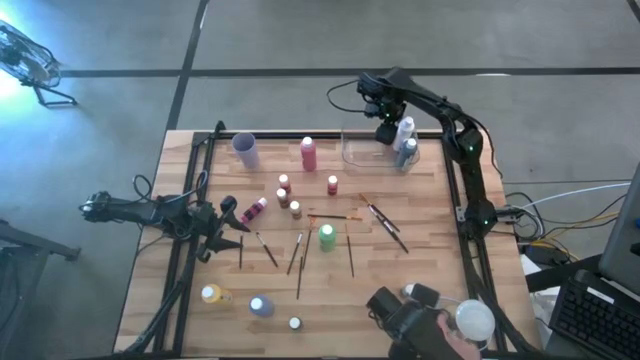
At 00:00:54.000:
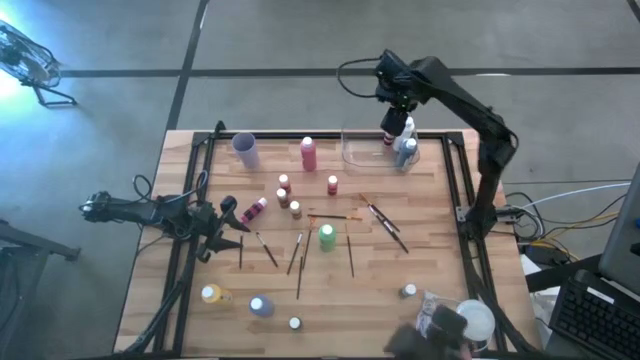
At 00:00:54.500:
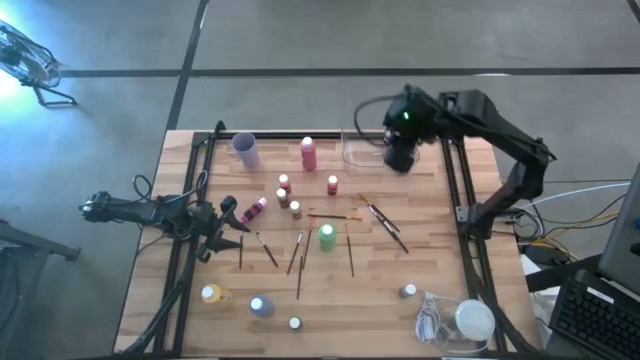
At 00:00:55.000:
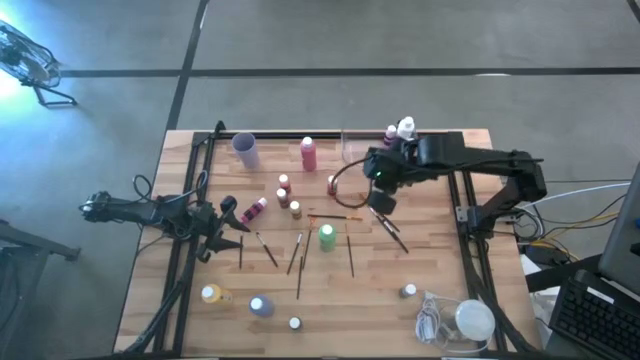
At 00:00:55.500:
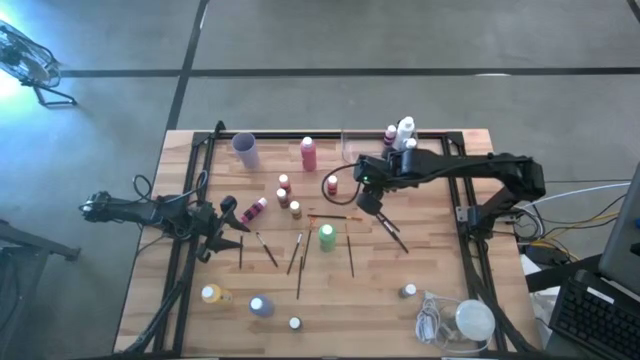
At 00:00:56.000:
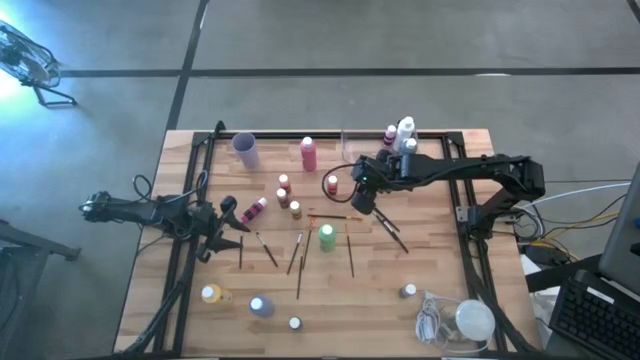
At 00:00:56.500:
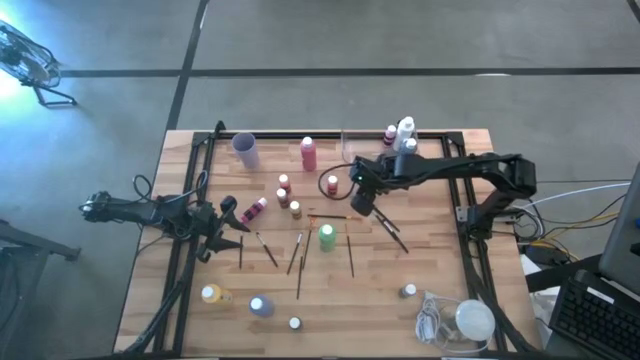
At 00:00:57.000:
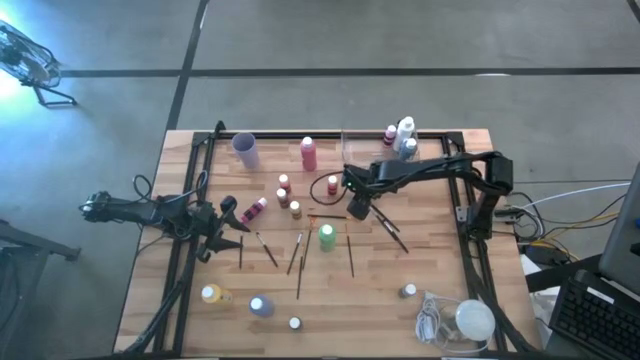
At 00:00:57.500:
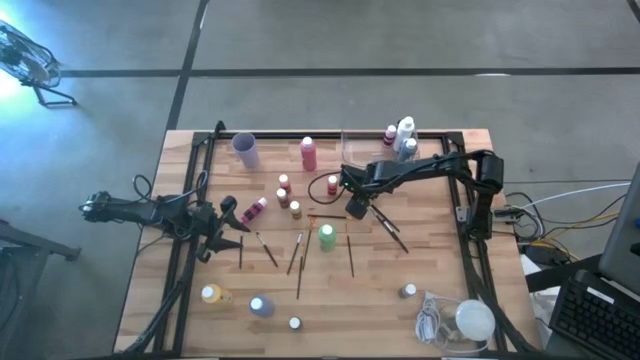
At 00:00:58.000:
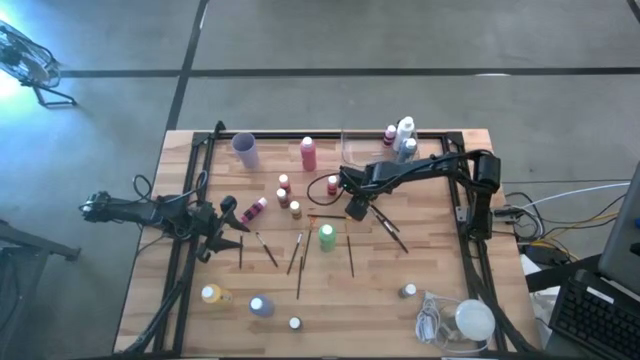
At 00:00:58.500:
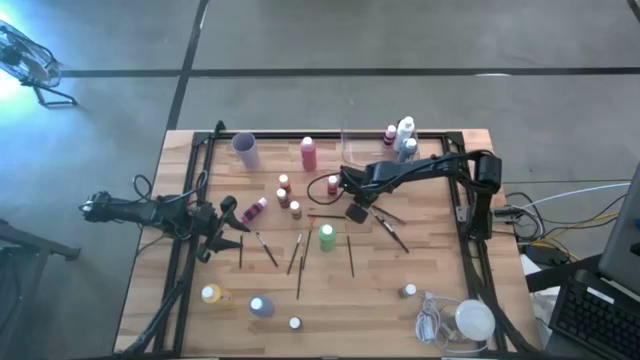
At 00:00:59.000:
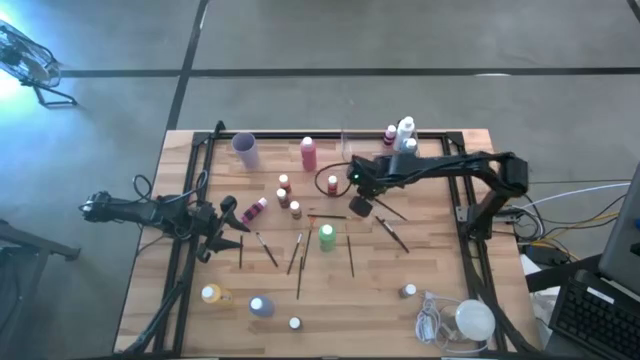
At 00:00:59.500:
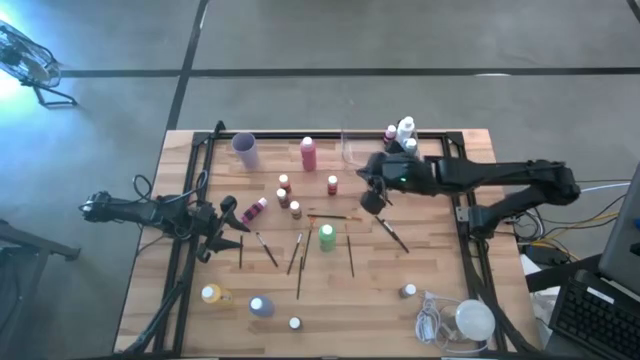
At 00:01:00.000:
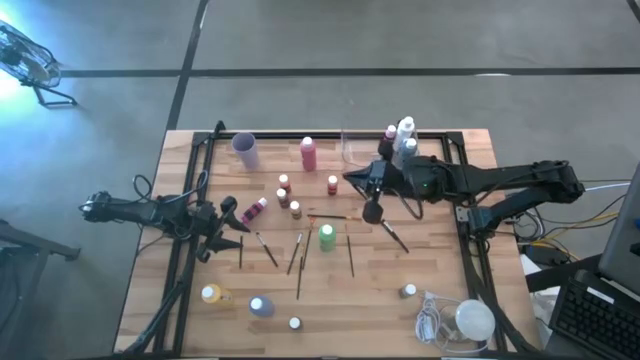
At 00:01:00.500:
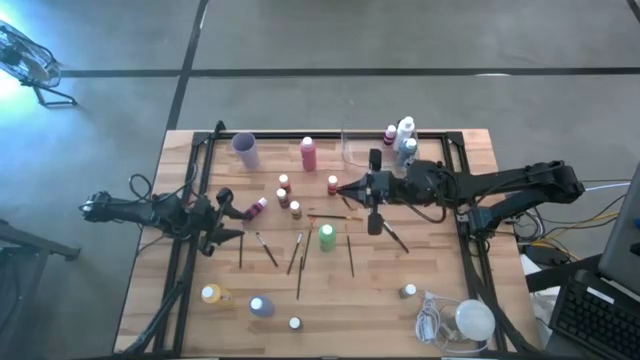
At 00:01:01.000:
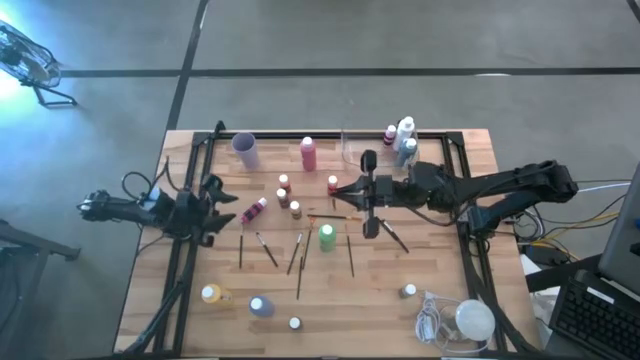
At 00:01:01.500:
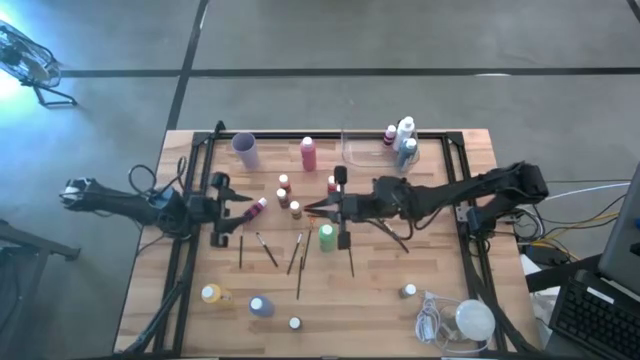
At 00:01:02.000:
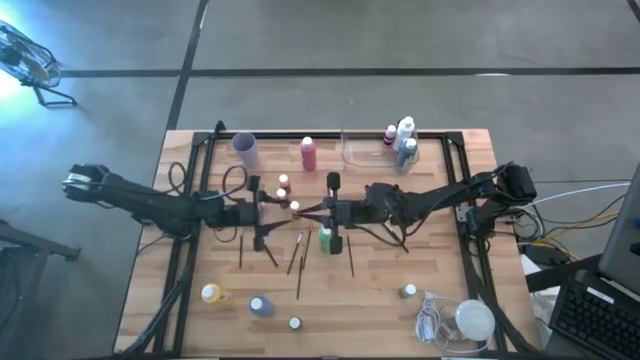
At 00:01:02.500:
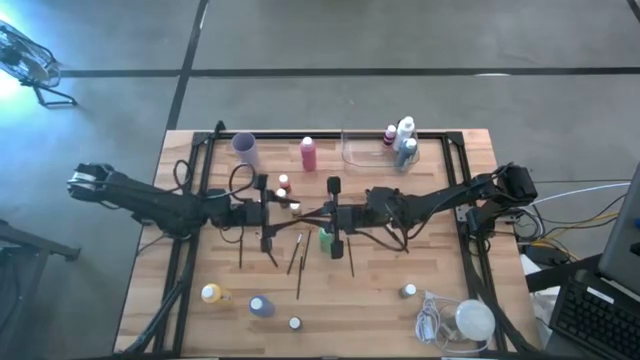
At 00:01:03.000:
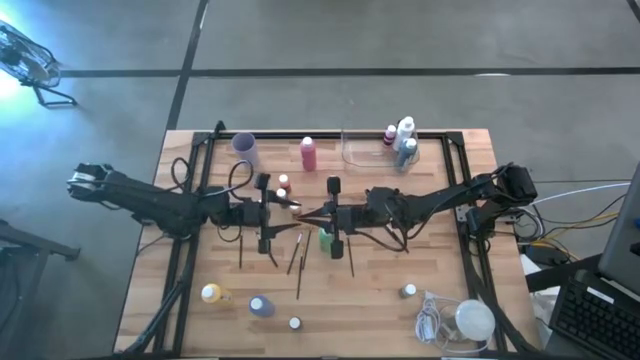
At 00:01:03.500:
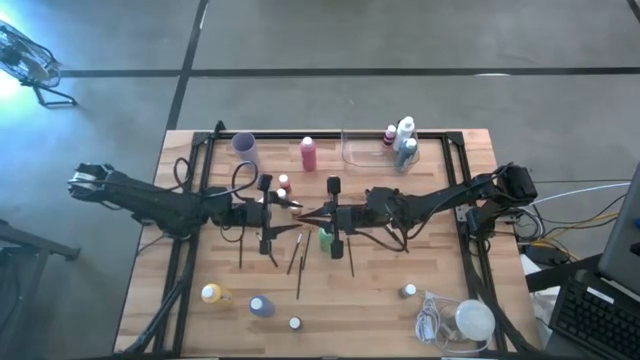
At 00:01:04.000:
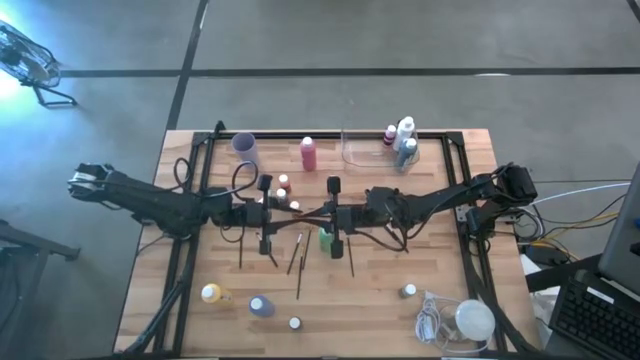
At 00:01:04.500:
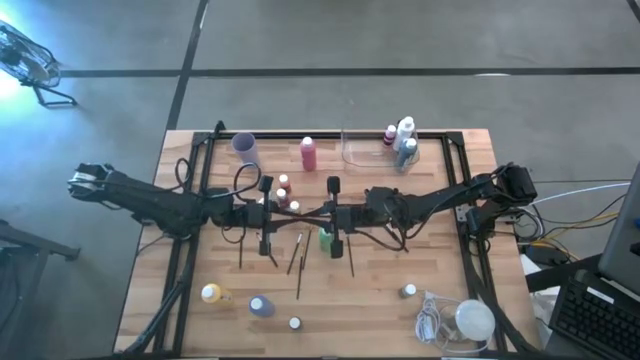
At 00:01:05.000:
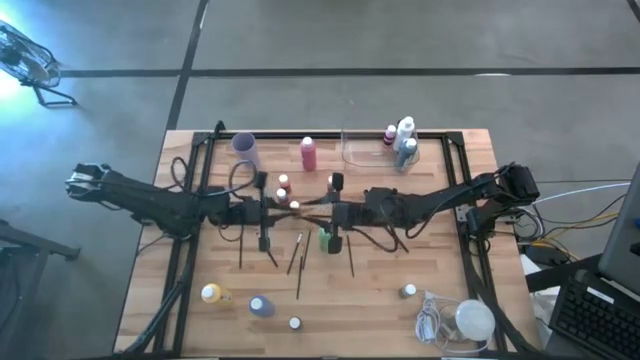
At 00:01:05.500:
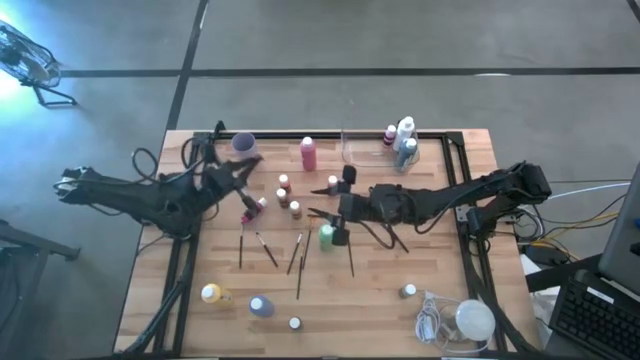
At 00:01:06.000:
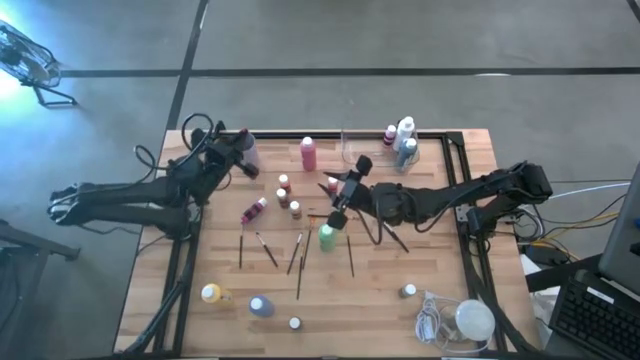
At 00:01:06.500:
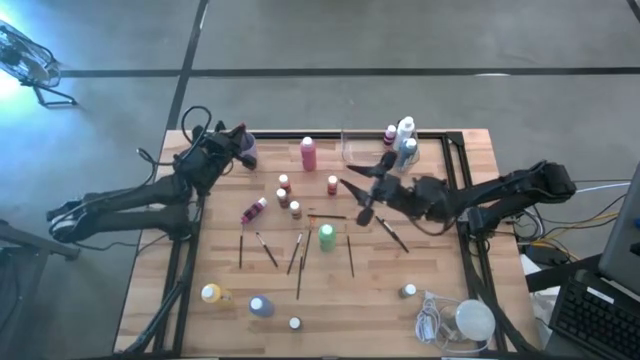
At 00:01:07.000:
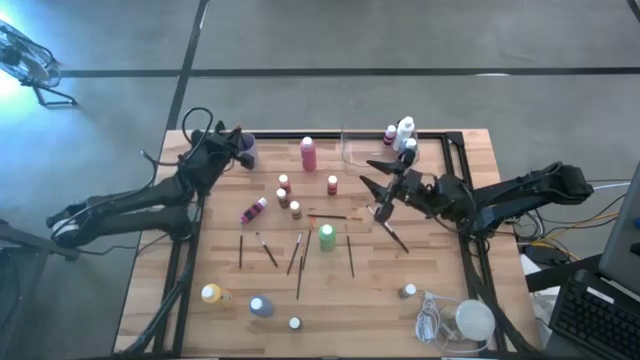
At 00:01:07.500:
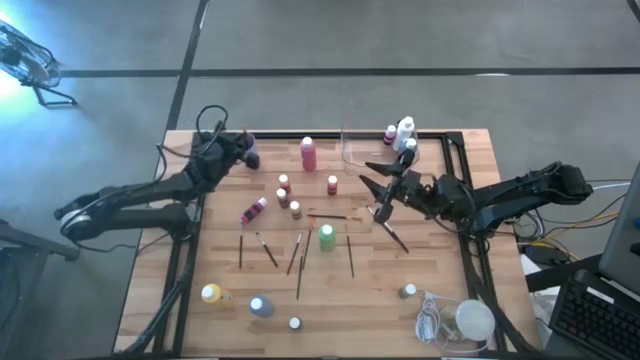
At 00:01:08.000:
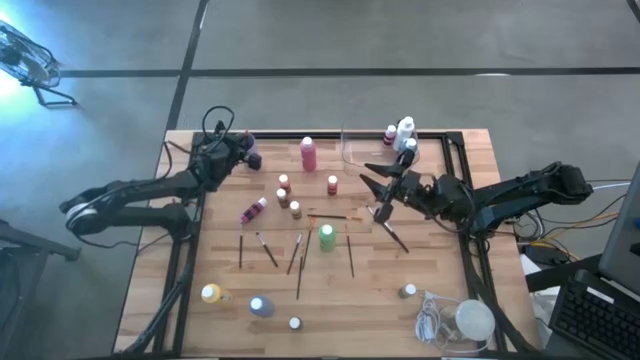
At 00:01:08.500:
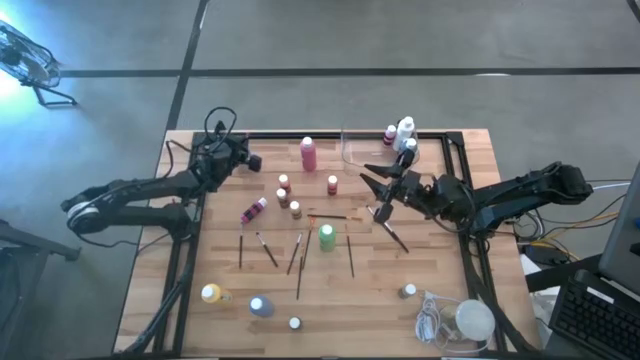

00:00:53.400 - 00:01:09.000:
Task: Pick & Place Paint Supplies
Put the gold paint brush into the violet cup
